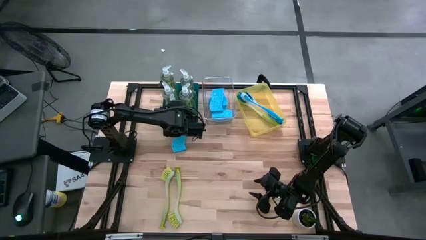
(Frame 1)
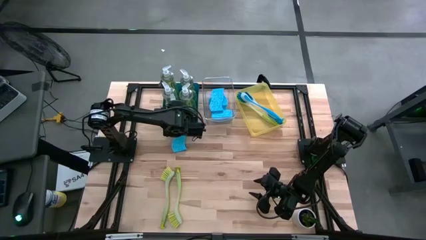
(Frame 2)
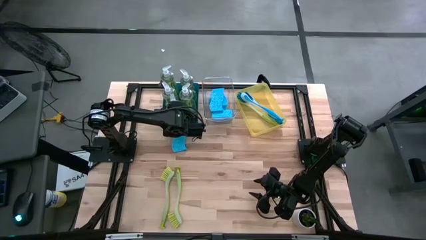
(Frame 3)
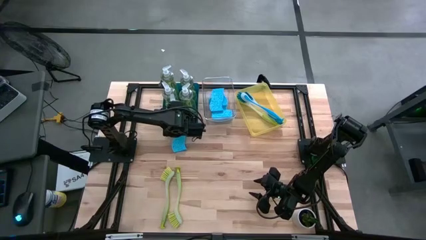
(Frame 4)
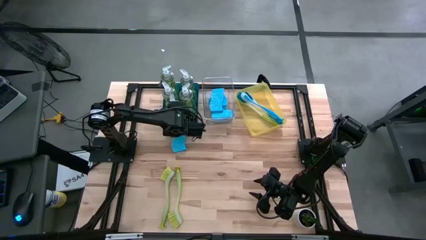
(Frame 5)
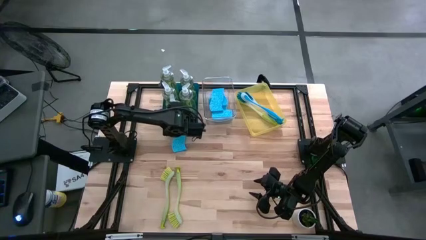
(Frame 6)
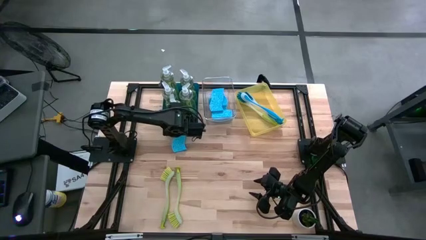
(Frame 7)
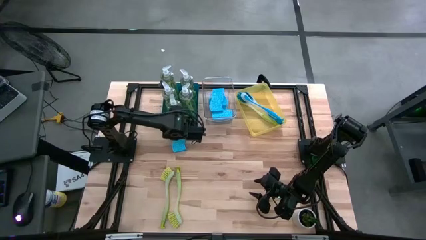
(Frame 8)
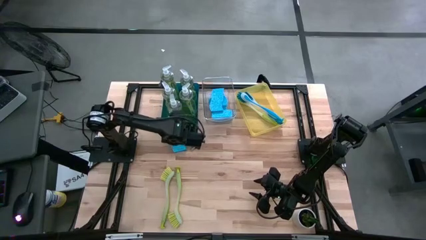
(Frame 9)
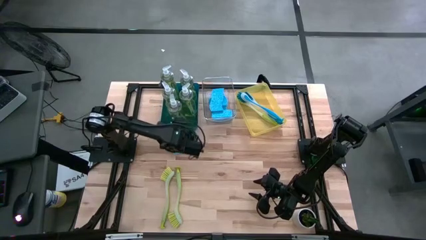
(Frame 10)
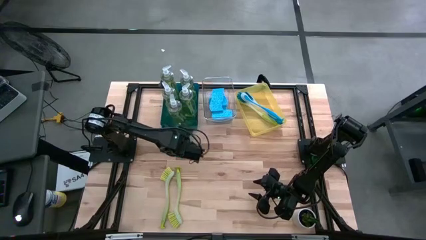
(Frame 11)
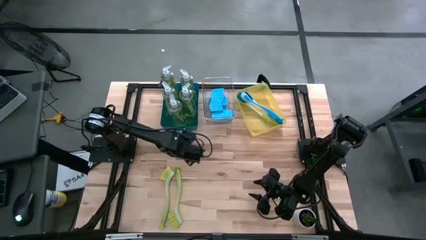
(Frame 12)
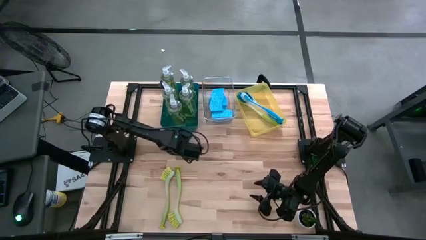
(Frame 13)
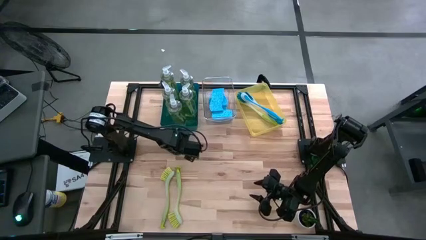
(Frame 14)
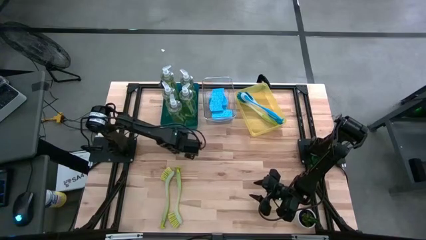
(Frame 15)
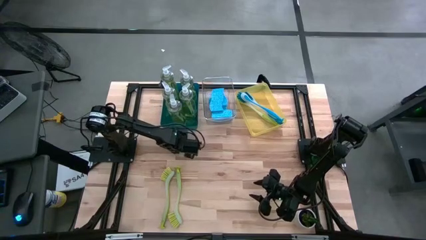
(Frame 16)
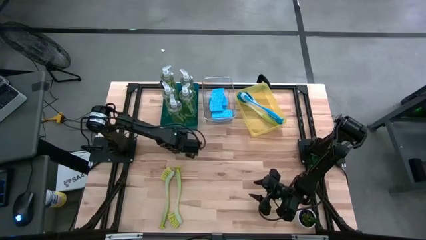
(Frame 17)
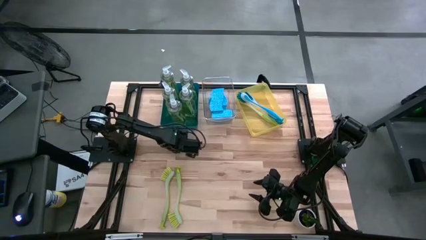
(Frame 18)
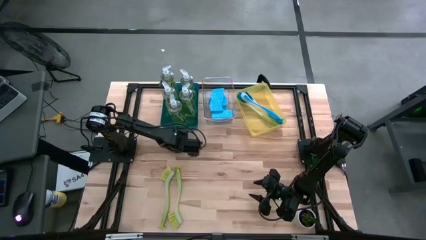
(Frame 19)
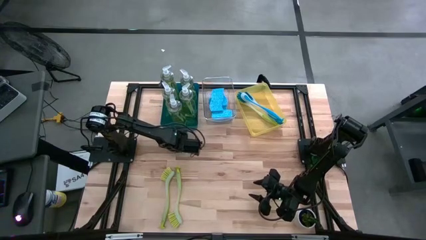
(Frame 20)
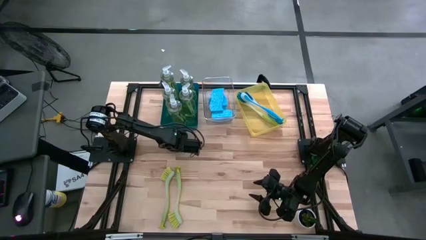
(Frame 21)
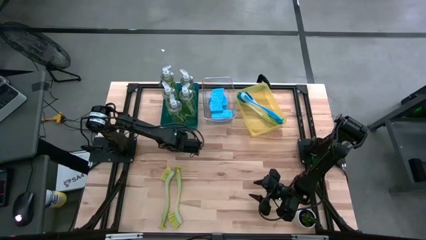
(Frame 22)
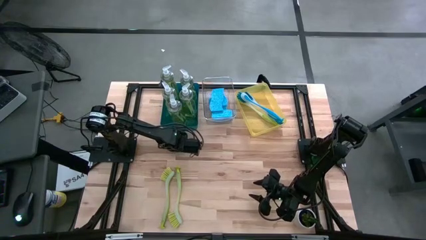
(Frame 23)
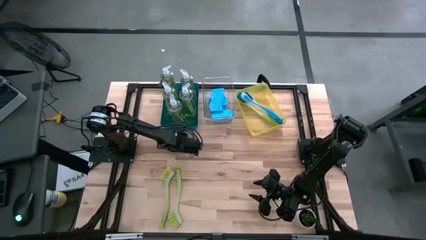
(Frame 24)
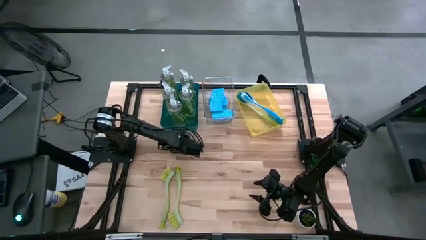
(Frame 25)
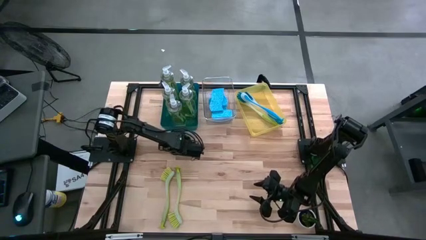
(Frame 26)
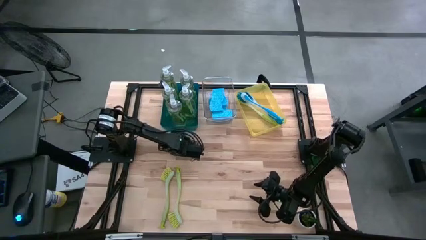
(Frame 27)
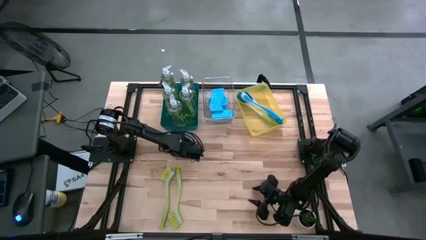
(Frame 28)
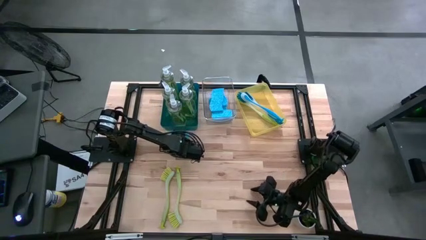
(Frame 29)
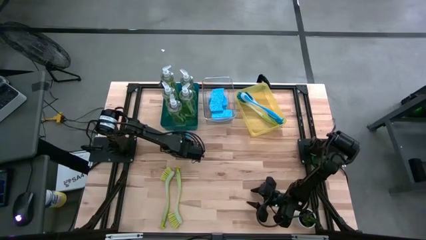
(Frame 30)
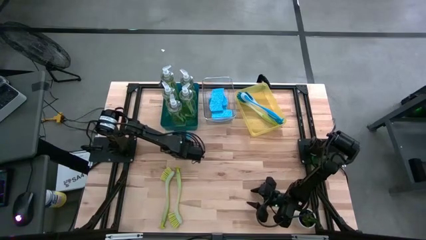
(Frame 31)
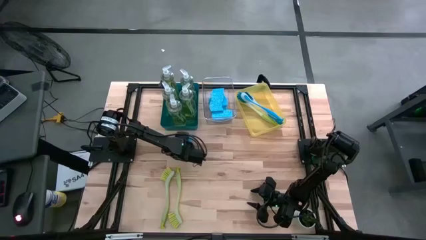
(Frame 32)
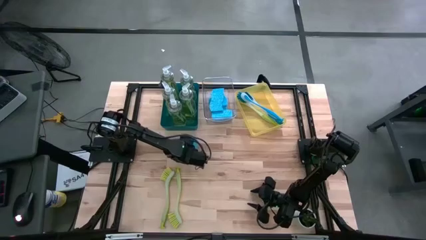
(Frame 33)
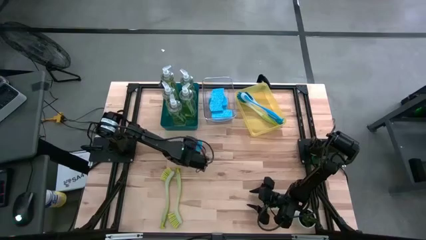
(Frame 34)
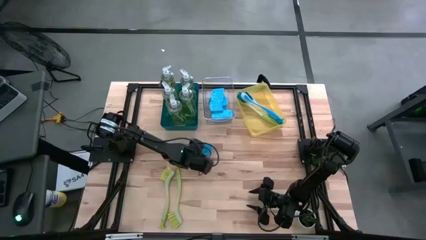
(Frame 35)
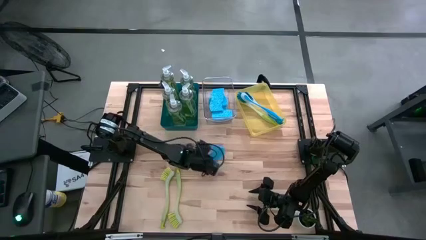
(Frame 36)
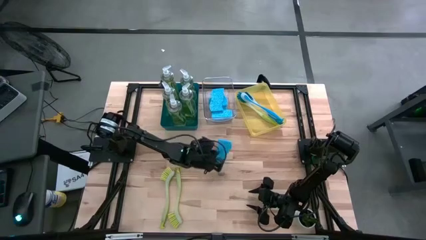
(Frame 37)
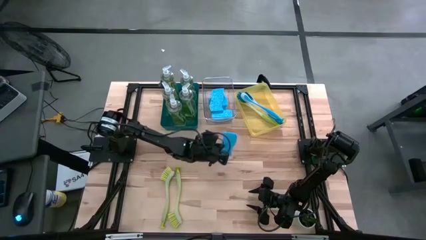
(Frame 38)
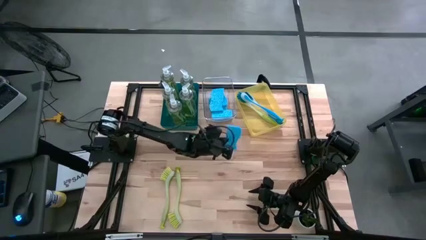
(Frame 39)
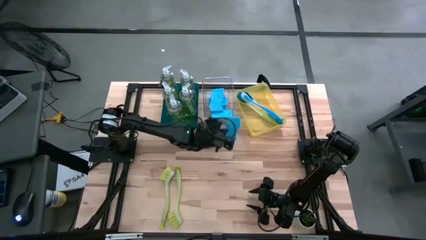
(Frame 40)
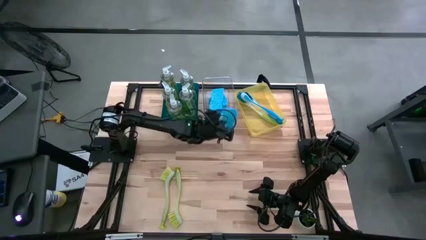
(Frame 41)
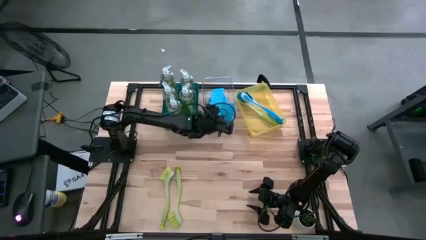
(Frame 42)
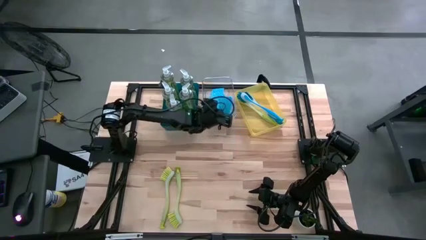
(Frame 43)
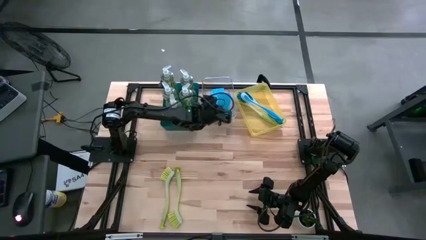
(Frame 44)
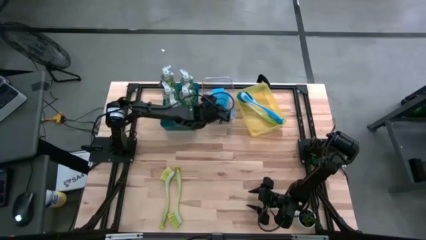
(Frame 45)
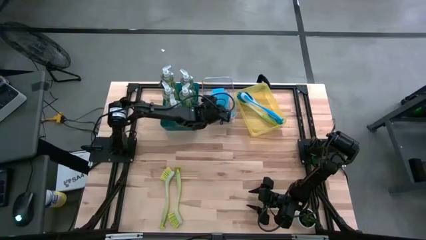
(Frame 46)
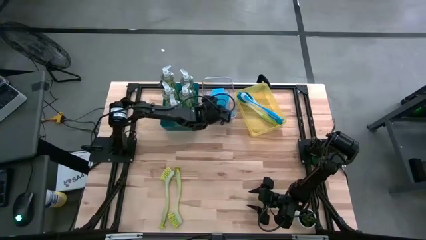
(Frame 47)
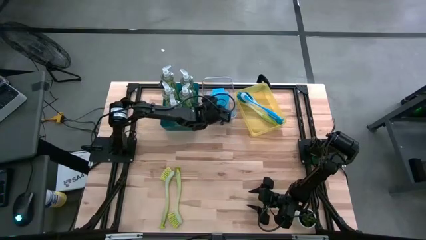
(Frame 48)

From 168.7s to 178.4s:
Task: Pick & Place Kitchen Sink Supplies
Put the blue sponge into the transparent bin

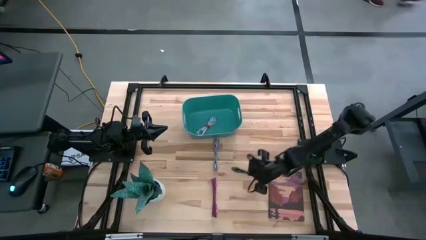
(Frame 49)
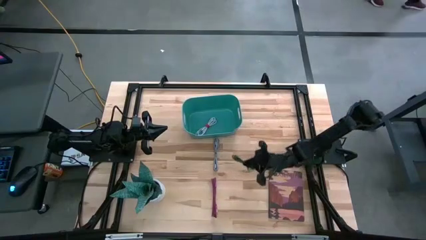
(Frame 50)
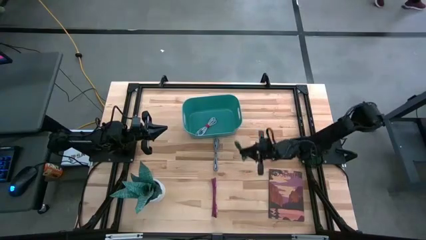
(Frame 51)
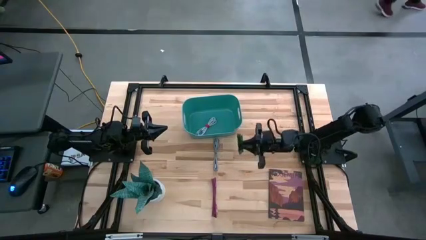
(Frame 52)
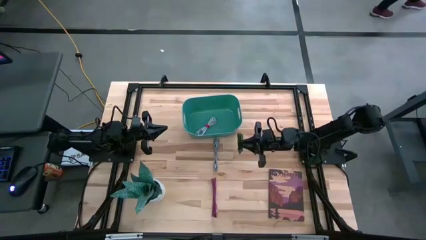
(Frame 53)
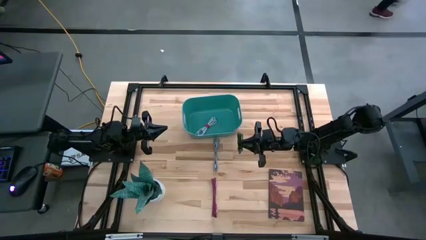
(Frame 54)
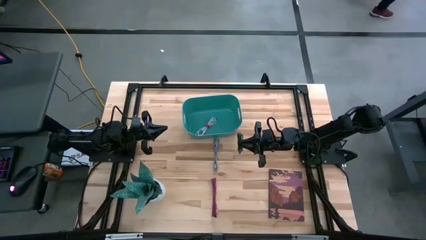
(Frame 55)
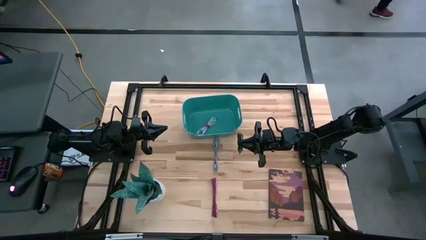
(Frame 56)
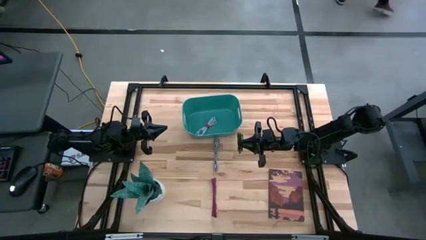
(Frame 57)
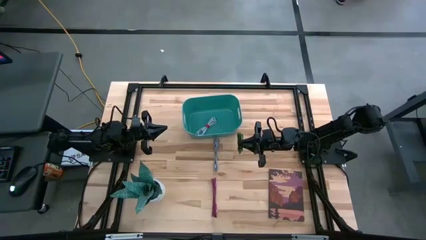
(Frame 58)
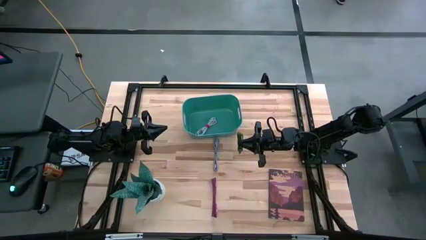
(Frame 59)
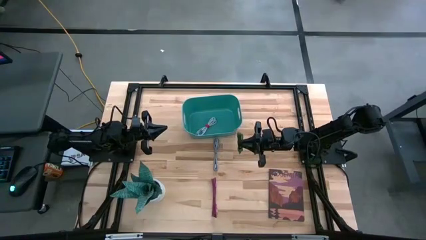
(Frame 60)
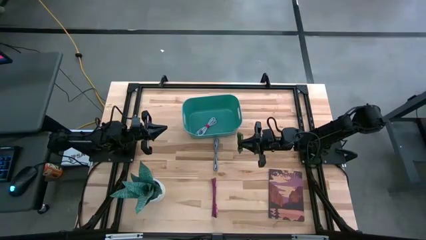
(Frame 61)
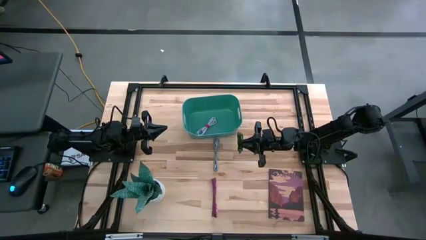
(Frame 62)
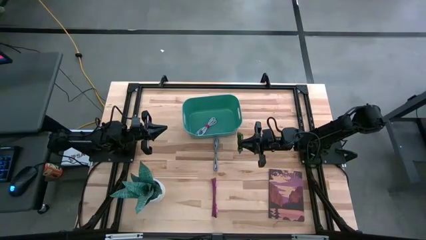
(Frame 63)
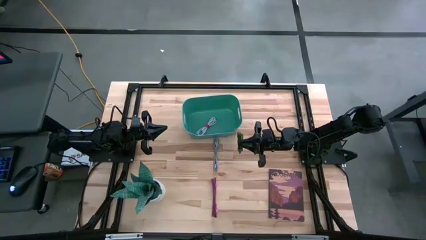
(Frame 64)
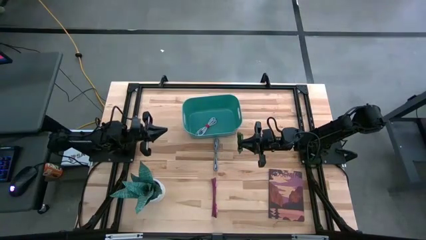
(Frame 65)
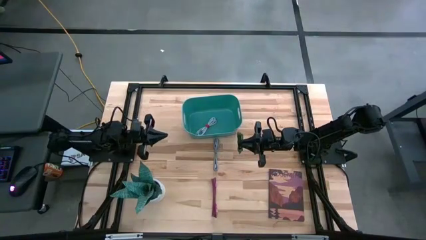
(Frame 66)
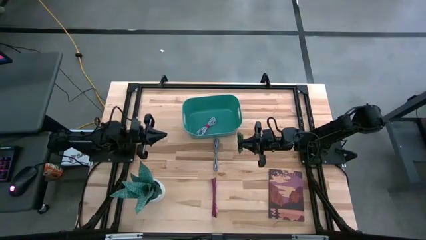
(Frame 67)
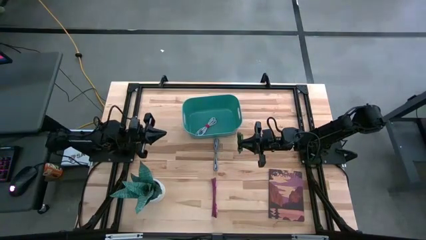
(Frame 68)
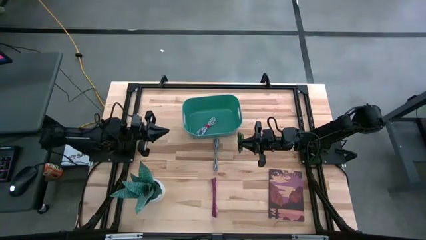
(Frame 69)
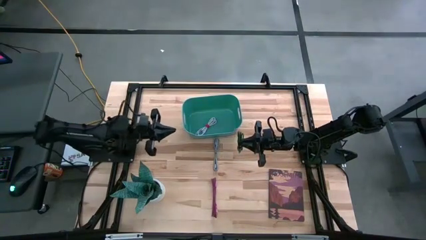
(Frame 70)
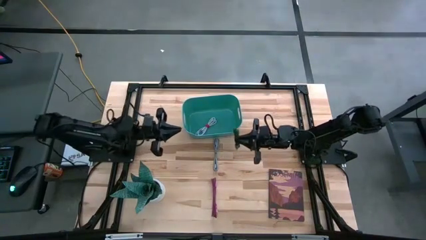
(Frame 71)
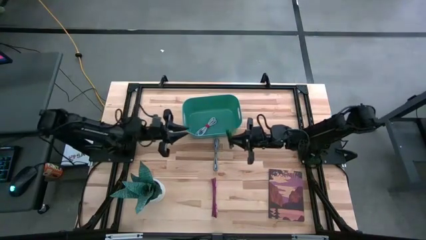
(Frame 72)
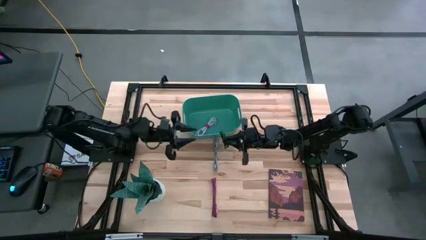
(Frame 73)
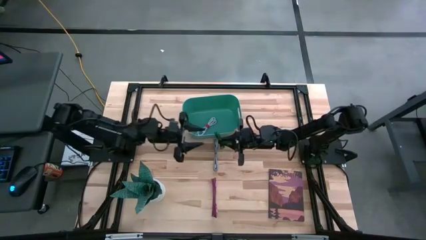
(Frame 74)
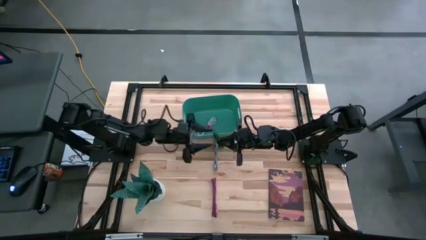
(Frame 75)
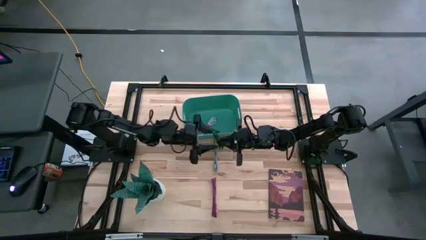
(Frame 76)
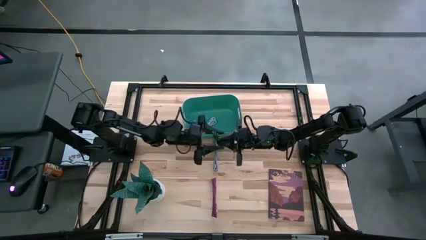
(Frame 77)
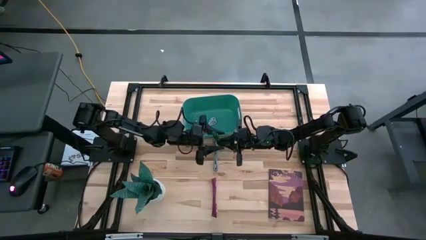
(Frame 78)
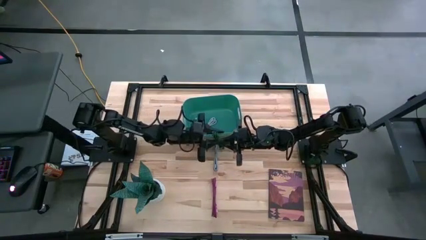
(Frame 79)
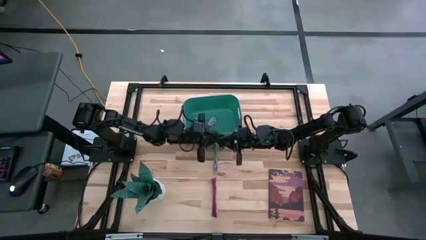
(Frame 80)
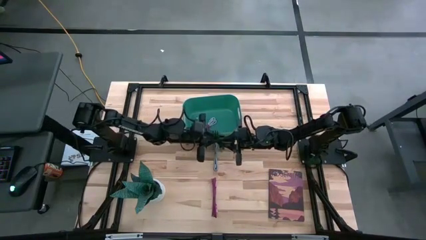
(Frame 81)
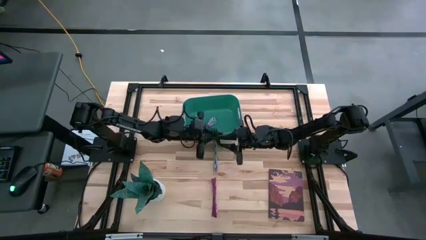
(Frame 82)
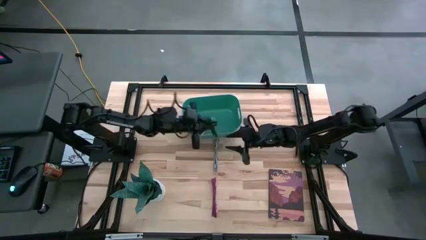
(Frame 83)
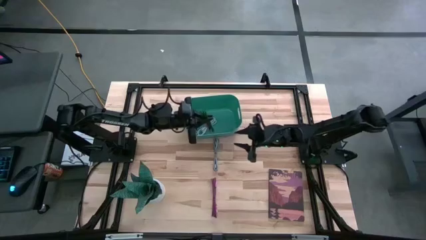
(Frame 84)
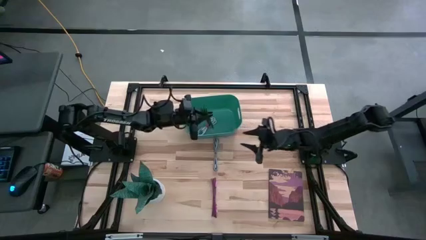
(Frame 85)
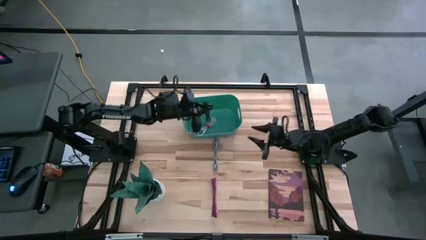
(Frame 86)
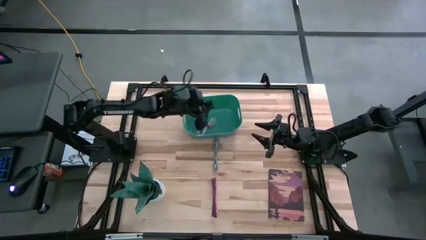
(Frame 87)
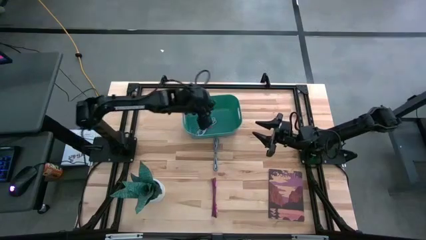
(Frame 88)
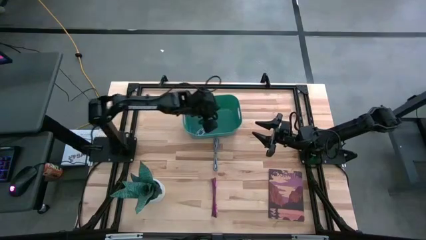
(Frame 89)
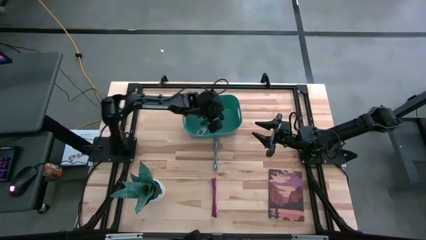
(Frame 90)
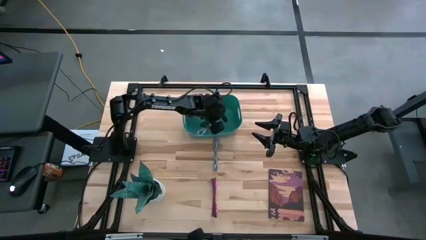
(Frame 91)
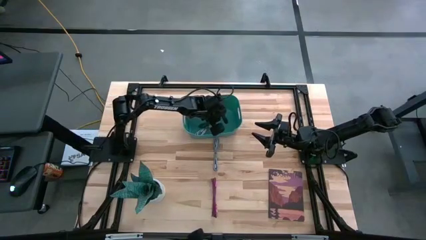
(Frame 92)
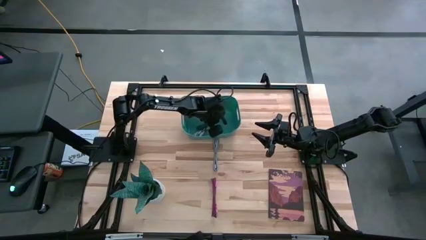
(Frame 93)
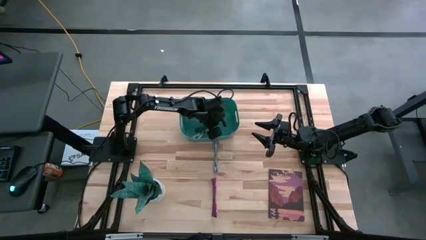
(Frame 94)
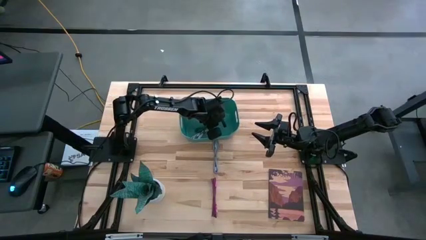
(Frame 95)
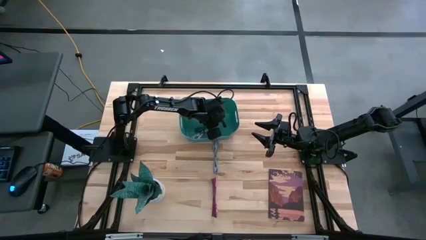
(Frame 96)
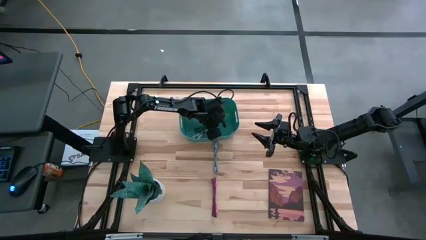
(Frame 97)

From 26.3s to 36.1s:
Task: Pick and place USB-C Cables
Put the green and black charger cable into the green bin
